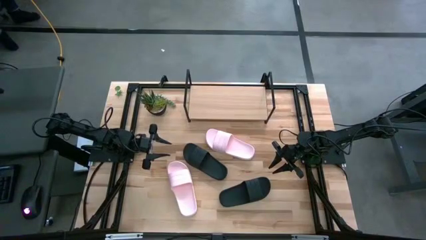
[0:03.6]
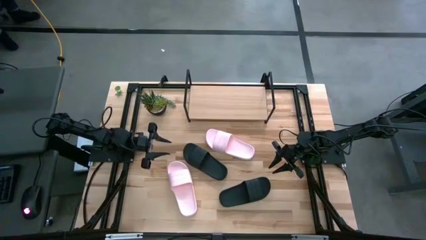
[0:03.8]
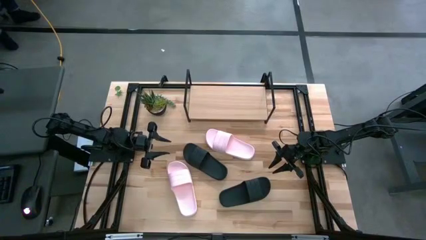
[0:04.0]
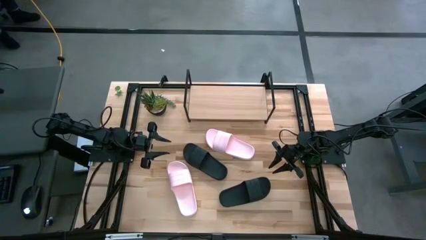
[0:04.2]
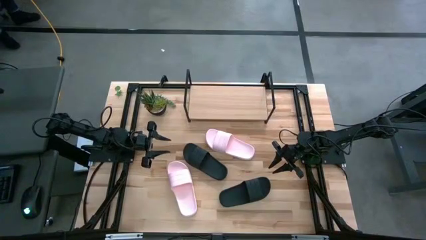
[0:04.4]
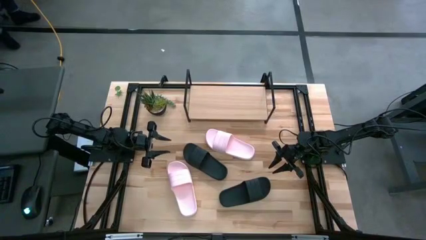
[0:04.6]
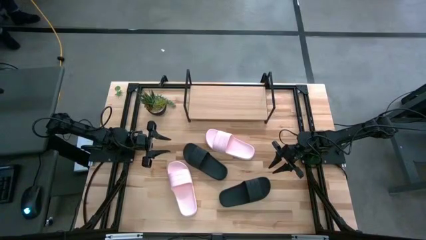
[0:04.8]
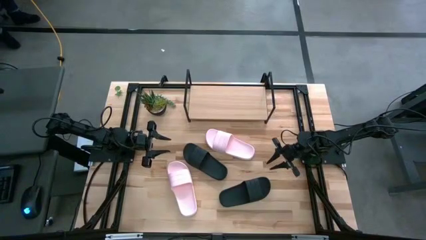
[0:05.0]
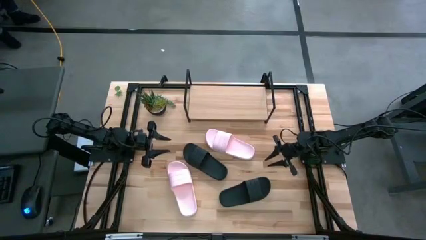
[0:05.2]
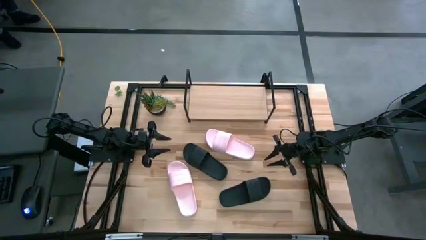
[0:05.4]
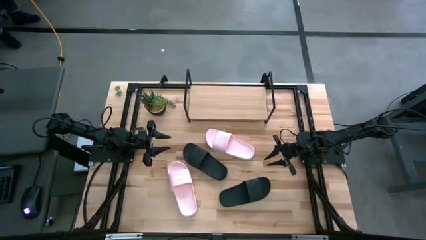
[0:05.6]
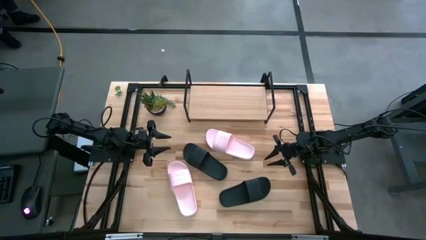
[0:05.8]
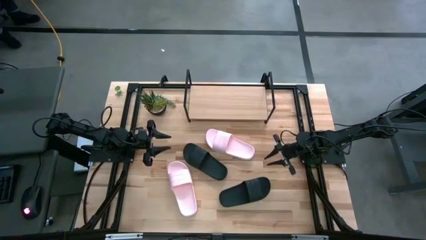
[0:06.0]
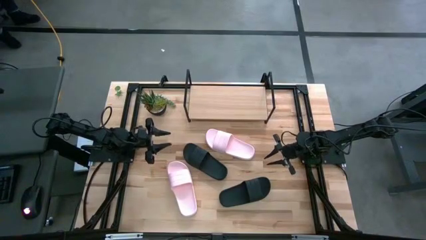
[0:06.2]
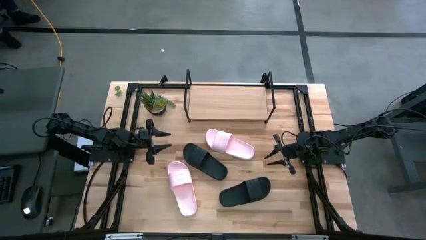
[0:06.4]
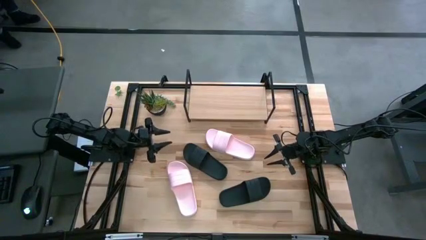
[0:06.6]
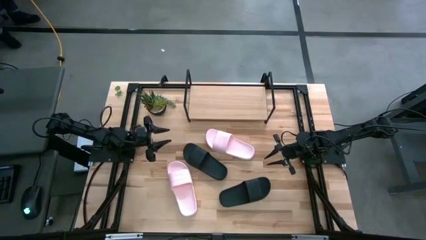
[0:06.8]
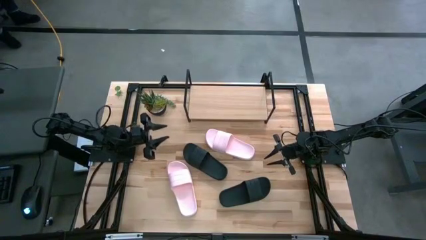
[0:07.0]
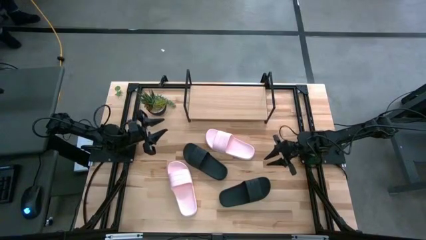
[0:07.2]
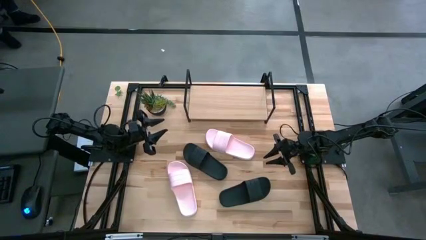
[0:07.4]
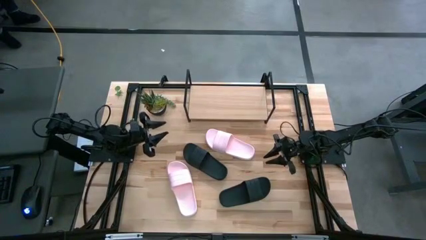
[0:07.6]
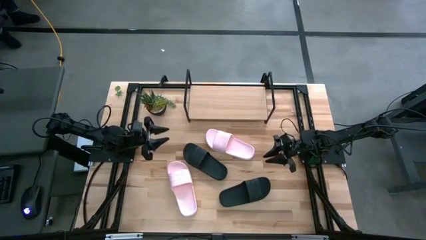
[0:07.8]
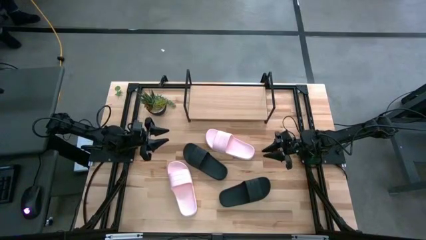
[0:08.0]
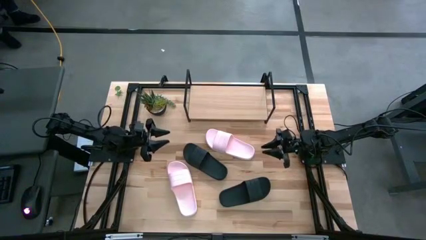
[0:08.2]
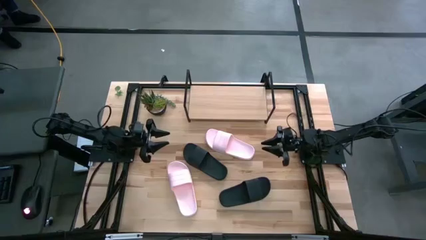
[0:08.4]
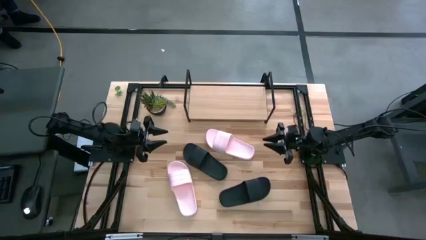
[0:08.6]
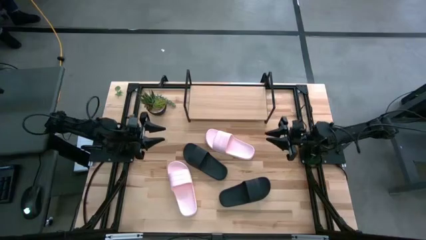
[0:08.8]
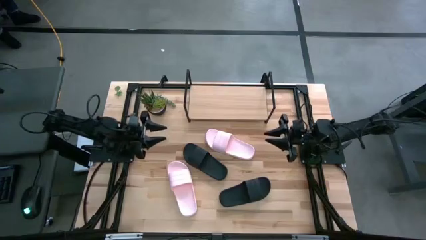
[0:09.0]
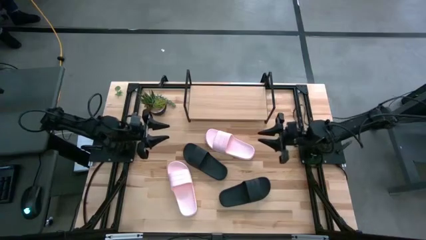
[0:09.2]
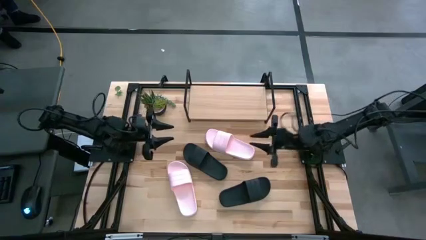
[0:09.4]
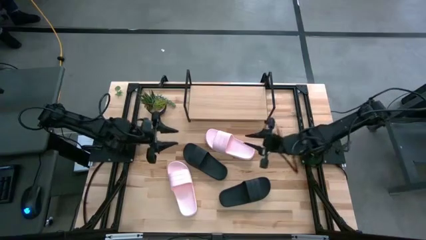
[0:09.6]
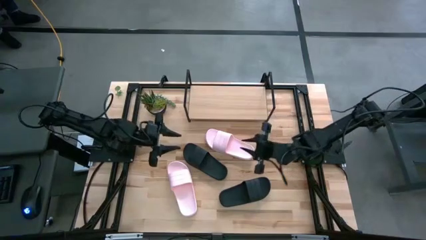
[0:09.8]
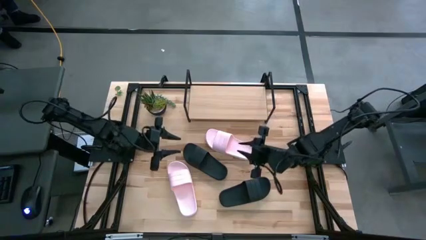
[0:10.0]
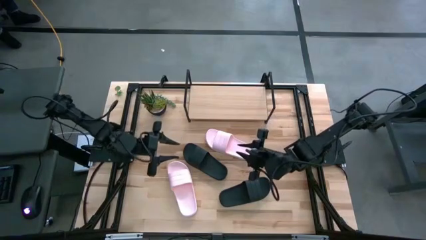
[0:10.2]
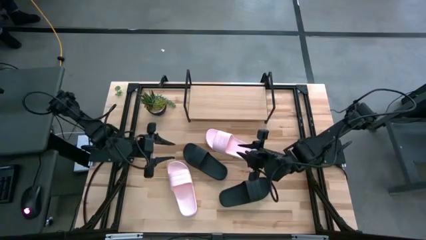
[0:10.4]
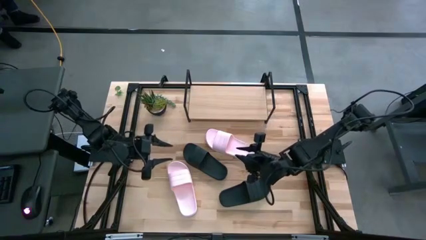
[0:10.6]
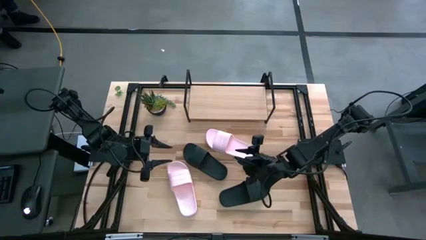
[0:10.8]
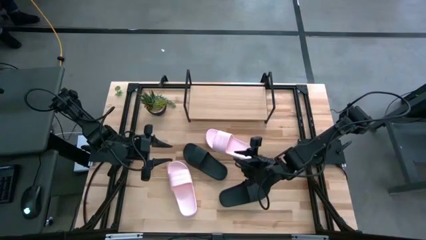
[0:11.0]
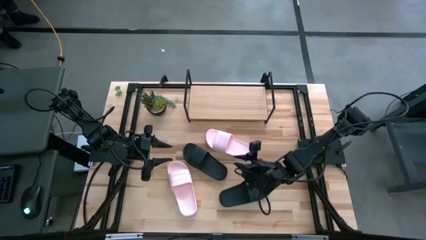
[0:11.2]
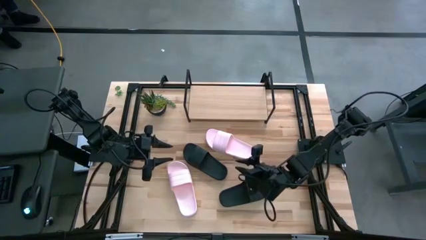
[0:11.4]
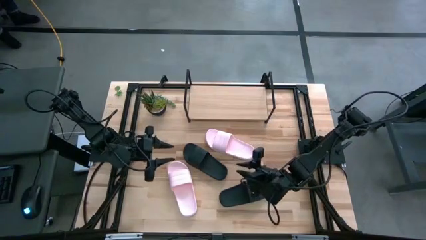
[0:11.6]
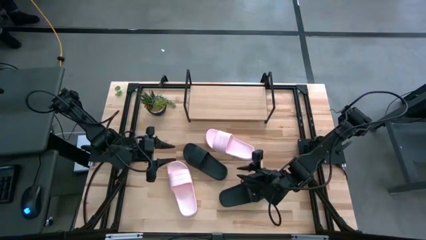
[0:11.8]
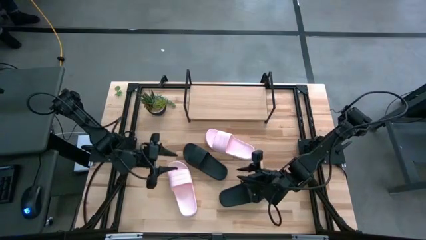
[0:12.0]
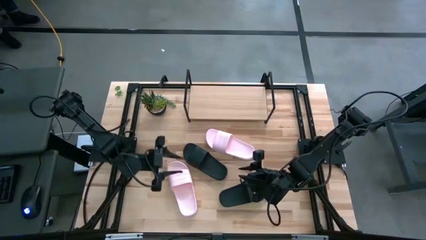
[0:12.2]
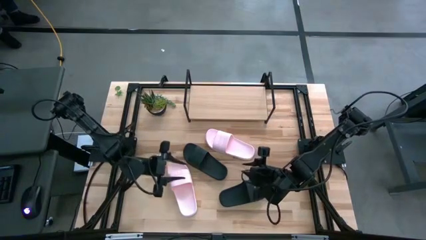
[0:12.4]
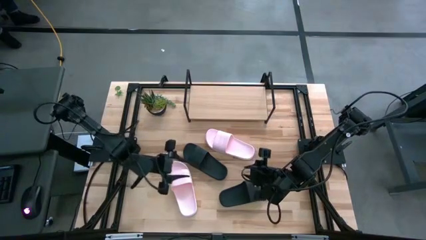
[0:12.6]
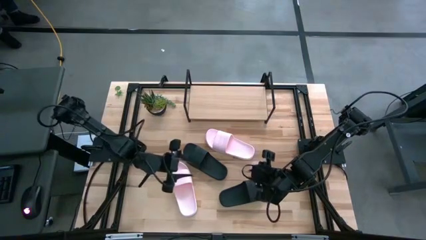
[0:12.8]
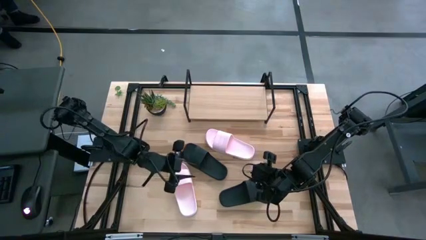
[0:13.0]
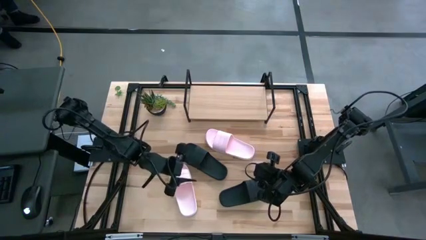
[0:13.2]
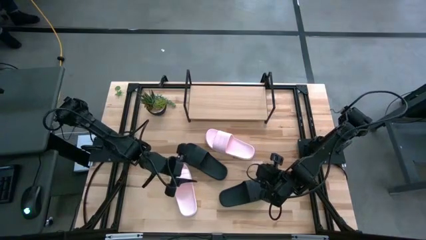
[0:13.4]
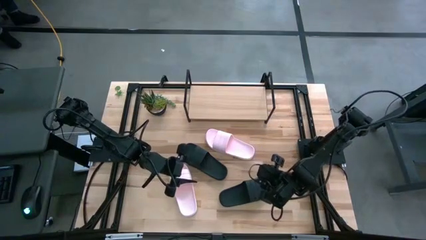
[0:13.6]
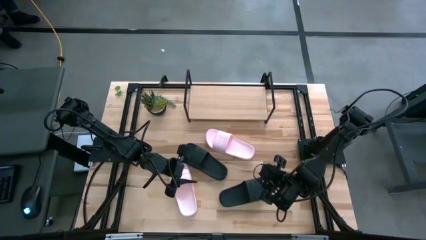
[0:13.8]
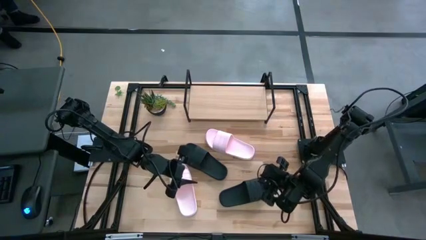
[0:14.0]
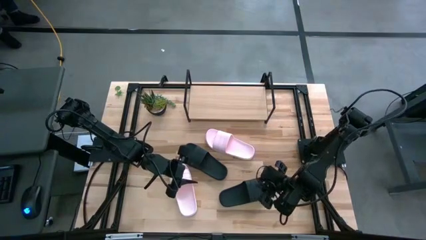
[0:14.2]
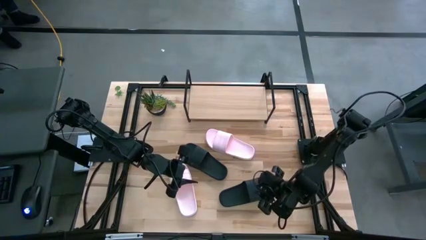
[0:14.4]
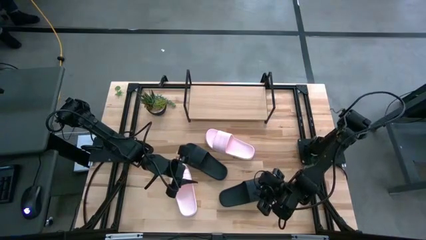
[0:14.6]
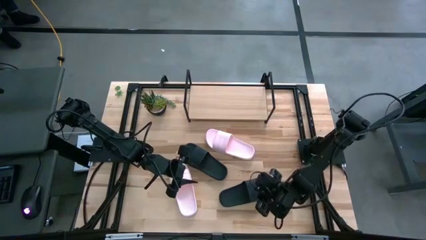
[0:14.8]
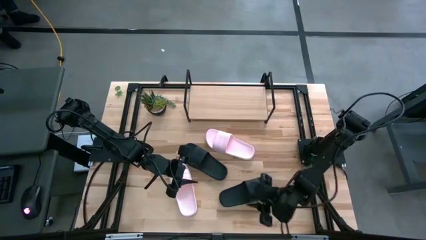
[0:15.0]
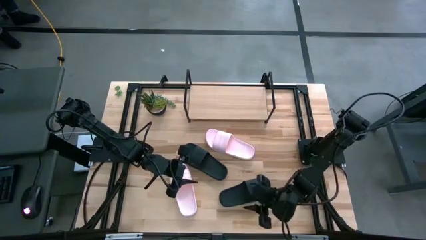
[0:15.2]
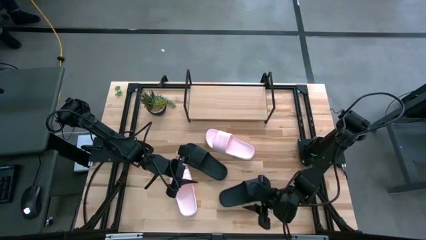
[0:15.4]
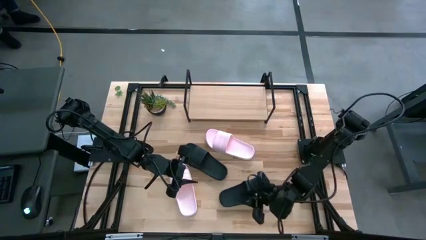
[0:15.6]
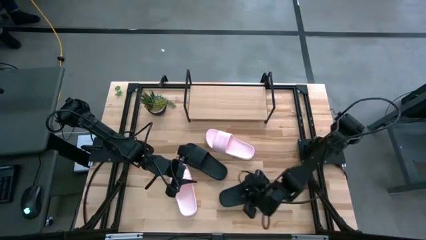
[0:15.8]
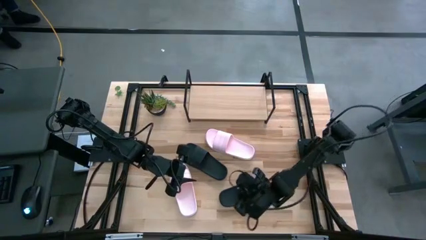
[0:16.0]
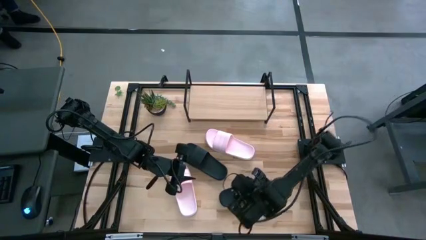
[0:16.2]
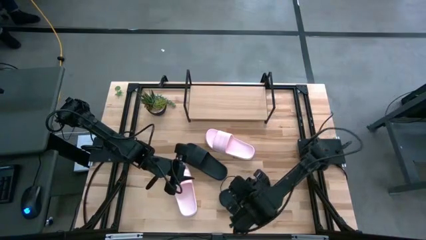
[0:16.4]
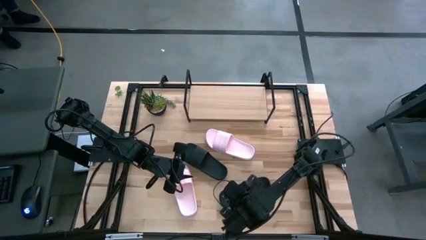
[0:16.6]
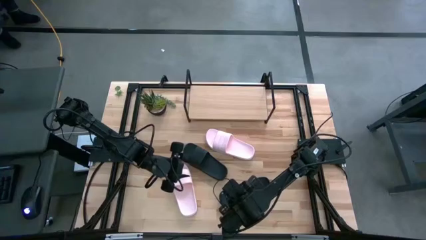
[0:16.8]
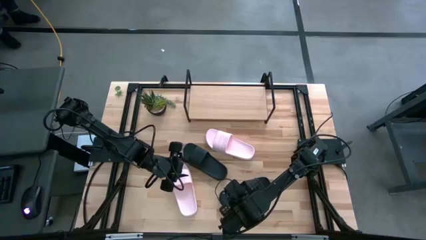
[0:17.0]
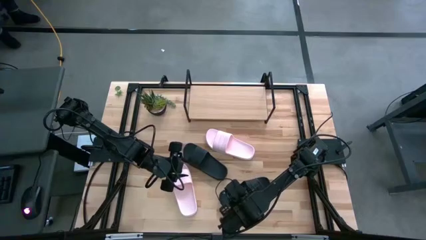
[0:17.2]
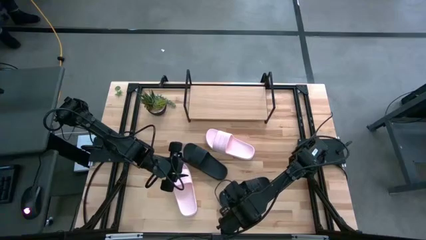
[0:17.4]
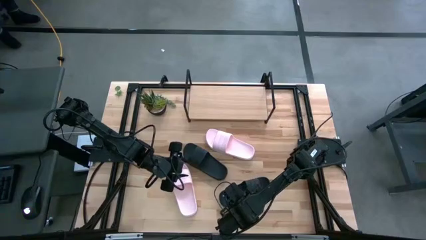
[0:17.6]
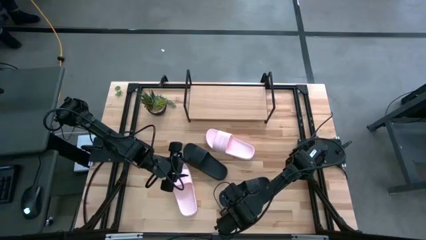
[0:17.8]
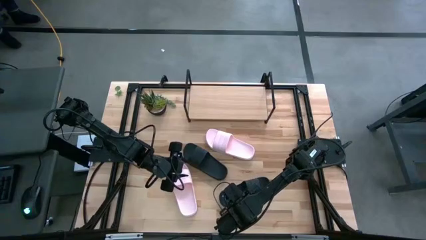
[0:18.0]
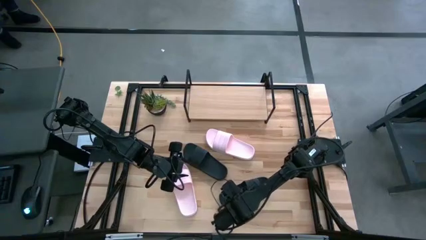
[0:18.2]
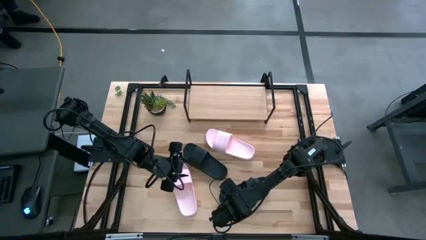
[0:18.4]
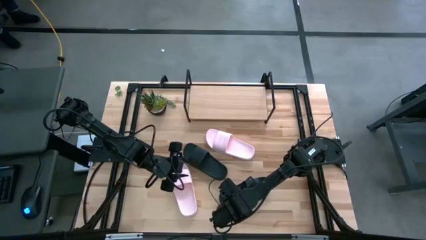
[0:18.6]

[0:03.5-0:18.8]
Task: Pick and place slides into the shelf
Put the bottom black slide on the shelf
